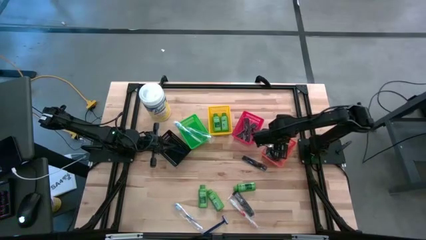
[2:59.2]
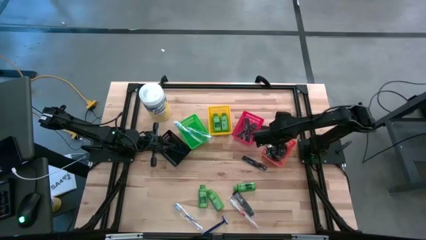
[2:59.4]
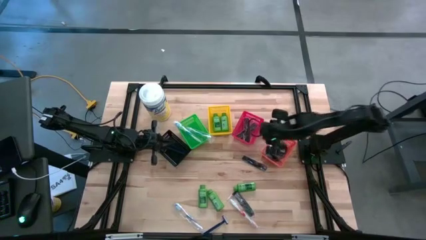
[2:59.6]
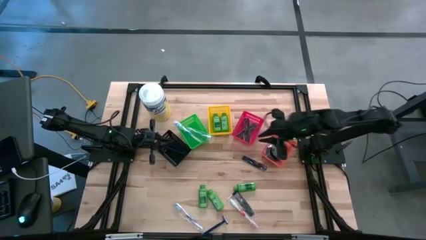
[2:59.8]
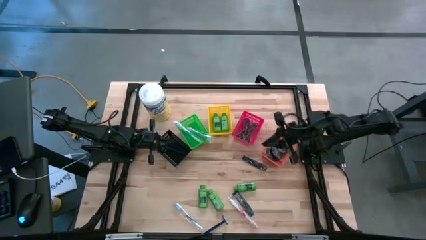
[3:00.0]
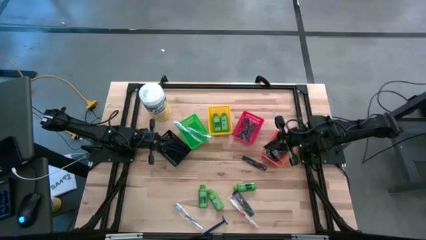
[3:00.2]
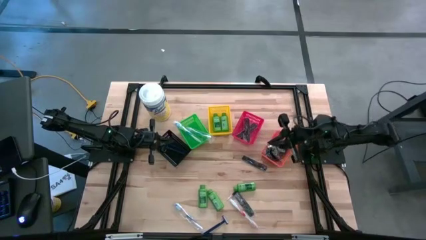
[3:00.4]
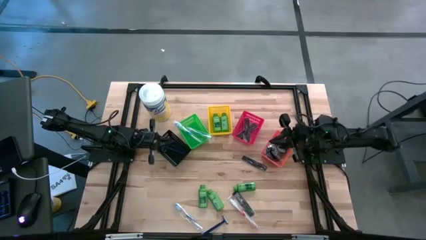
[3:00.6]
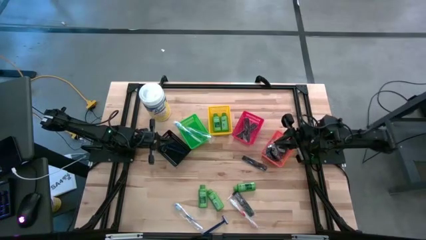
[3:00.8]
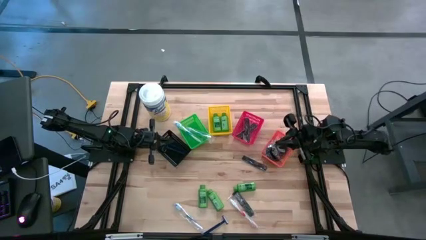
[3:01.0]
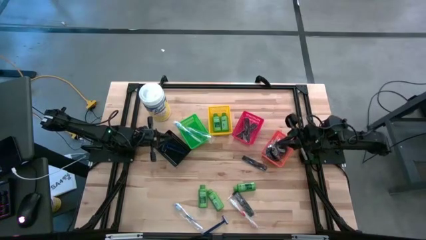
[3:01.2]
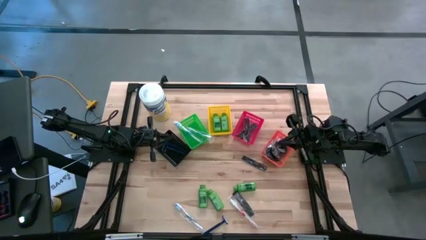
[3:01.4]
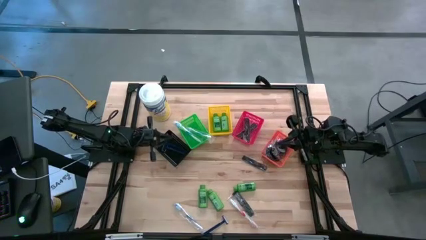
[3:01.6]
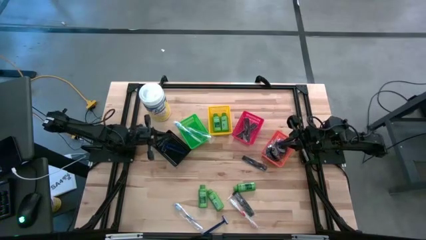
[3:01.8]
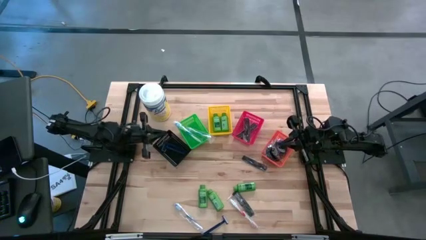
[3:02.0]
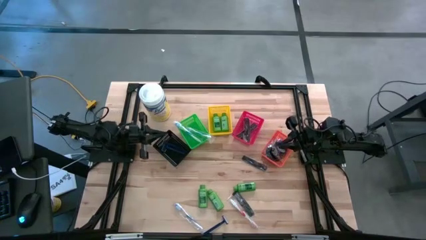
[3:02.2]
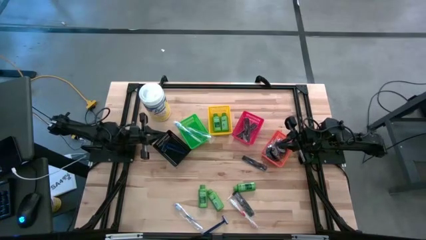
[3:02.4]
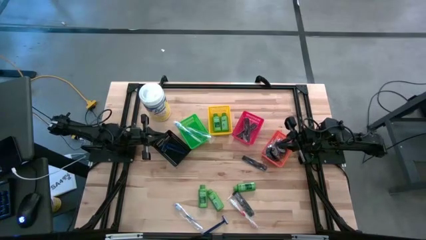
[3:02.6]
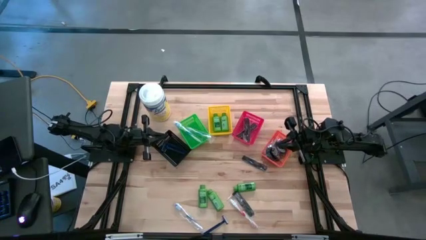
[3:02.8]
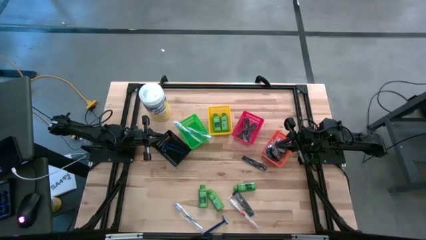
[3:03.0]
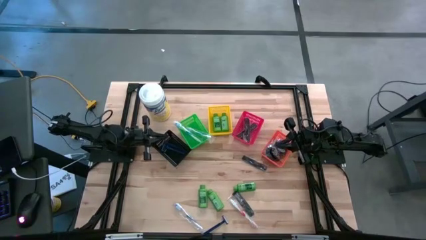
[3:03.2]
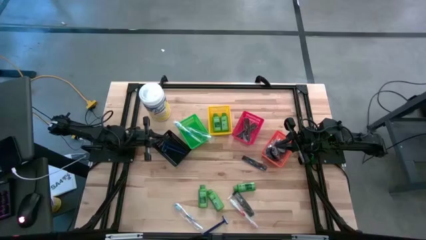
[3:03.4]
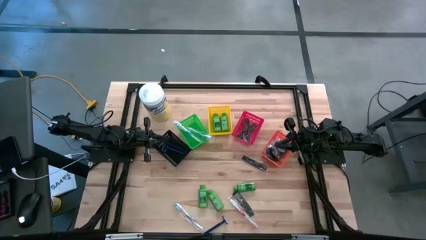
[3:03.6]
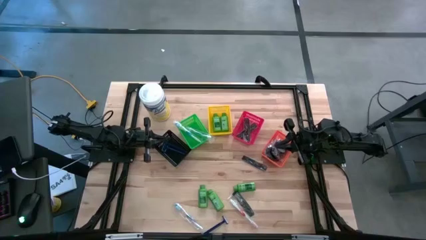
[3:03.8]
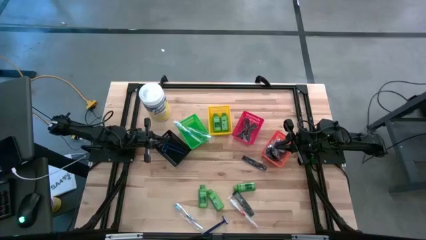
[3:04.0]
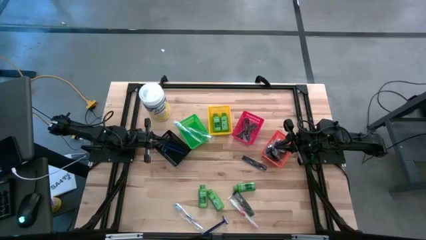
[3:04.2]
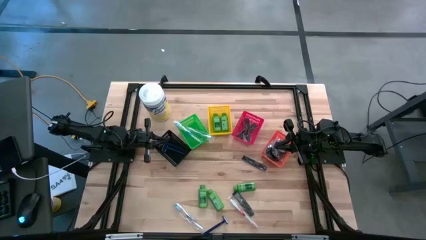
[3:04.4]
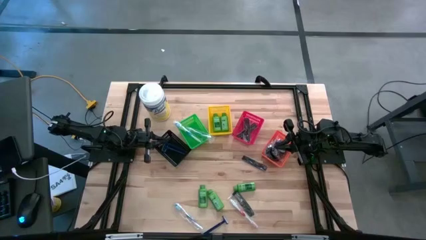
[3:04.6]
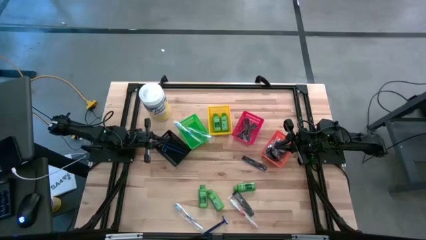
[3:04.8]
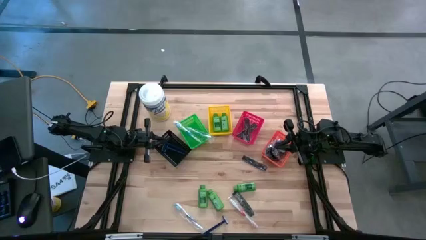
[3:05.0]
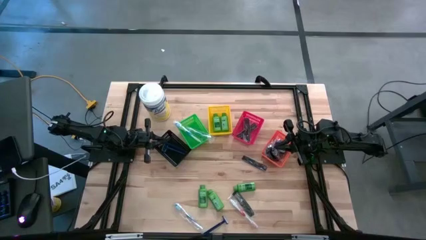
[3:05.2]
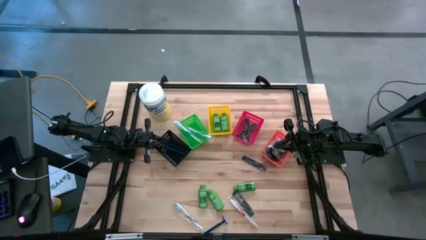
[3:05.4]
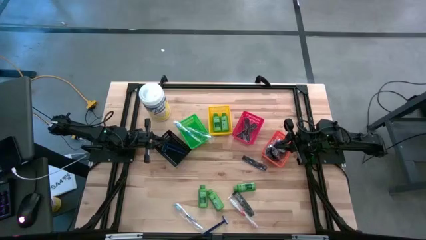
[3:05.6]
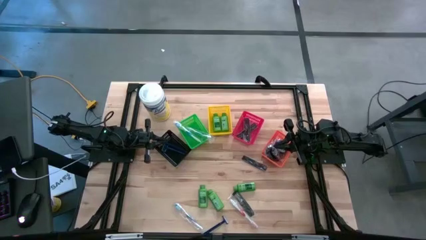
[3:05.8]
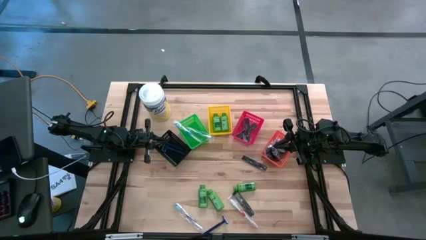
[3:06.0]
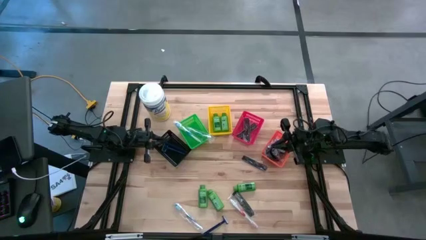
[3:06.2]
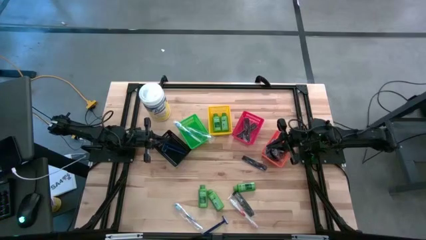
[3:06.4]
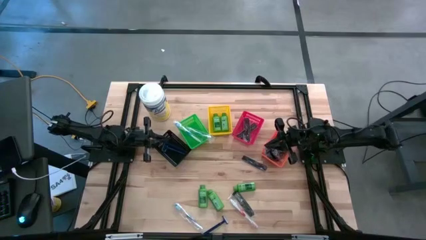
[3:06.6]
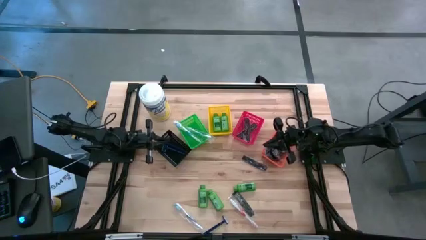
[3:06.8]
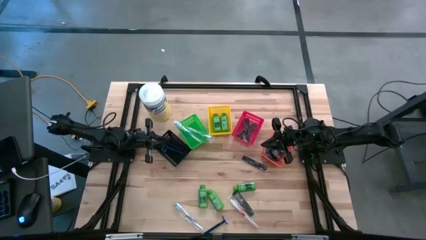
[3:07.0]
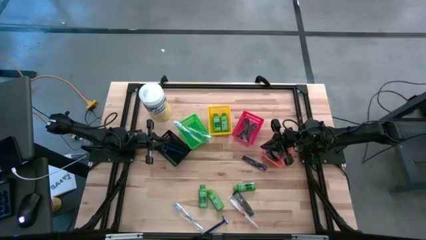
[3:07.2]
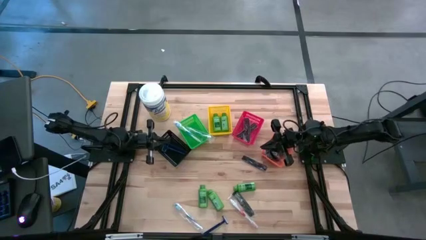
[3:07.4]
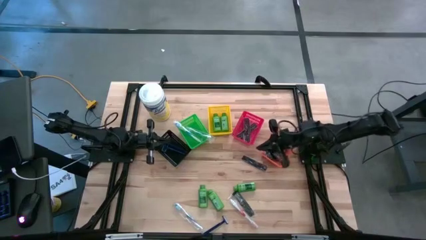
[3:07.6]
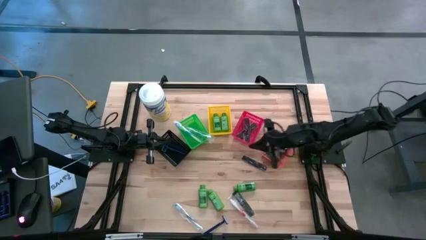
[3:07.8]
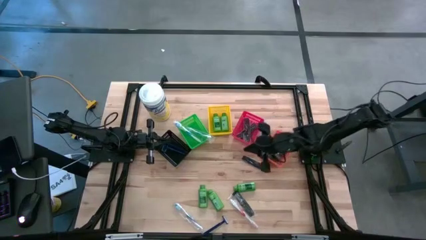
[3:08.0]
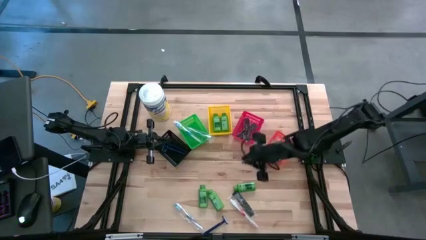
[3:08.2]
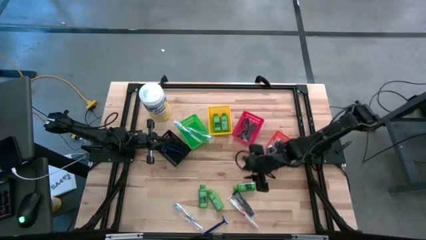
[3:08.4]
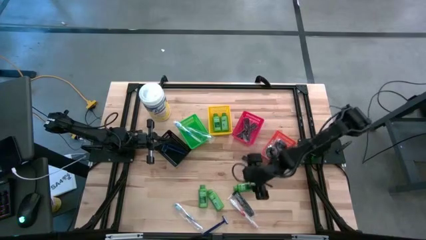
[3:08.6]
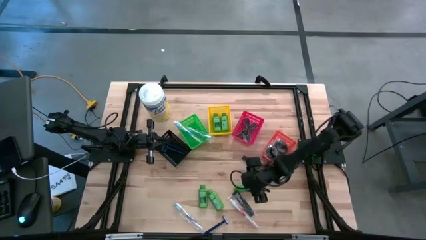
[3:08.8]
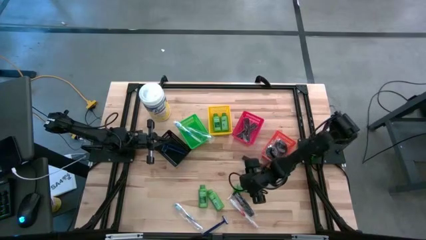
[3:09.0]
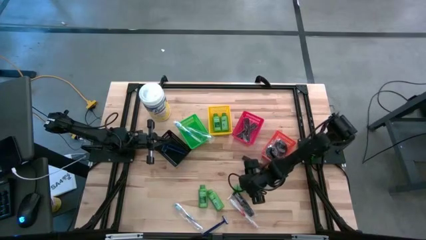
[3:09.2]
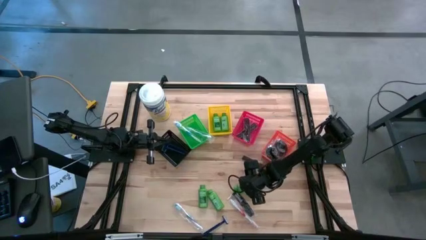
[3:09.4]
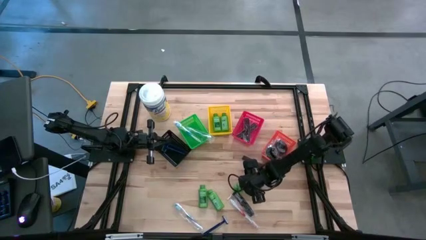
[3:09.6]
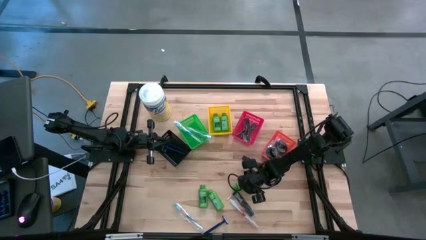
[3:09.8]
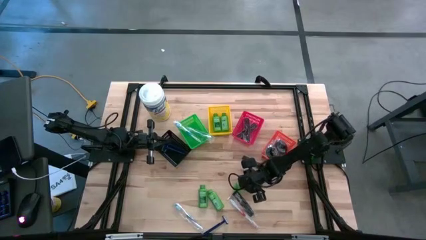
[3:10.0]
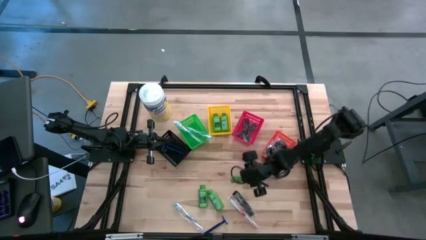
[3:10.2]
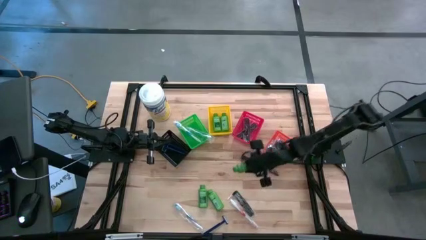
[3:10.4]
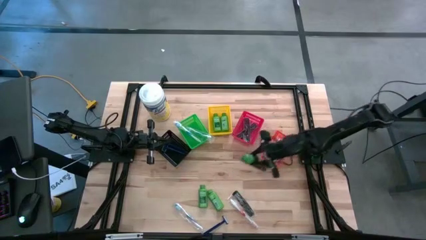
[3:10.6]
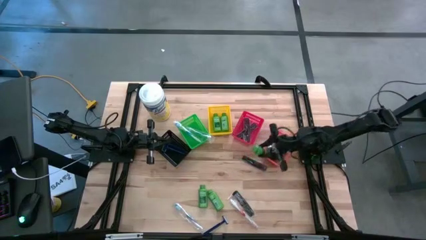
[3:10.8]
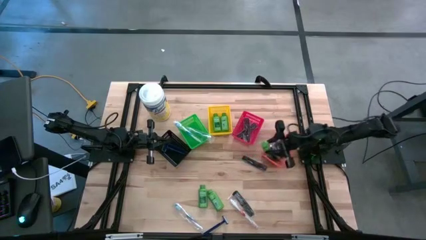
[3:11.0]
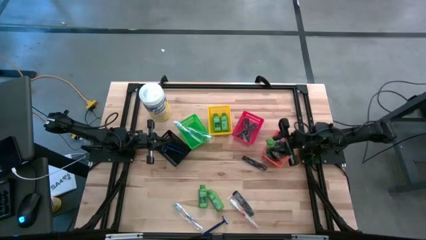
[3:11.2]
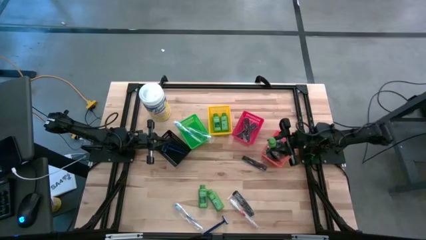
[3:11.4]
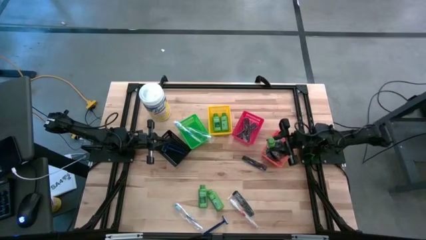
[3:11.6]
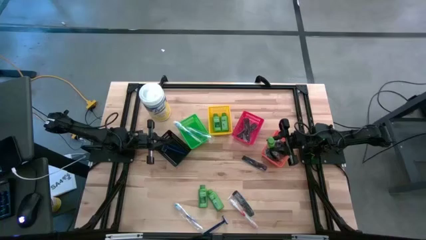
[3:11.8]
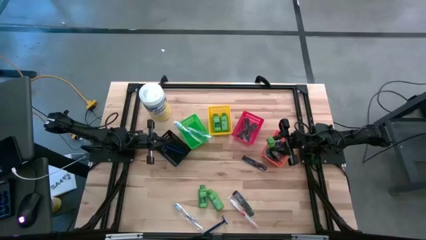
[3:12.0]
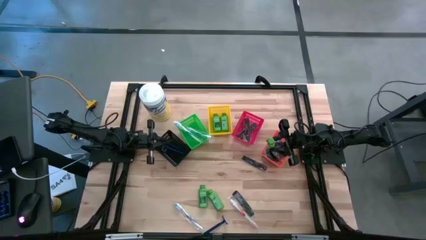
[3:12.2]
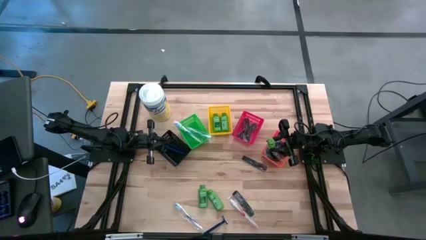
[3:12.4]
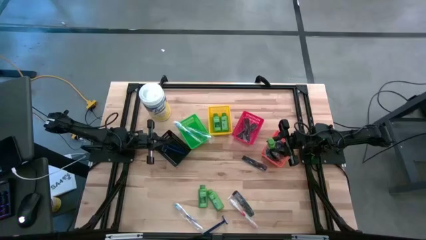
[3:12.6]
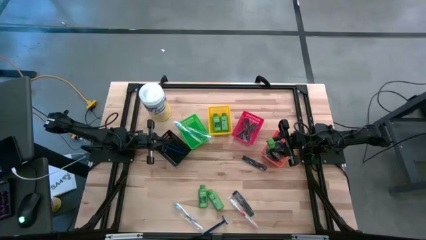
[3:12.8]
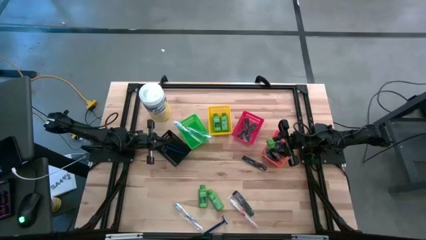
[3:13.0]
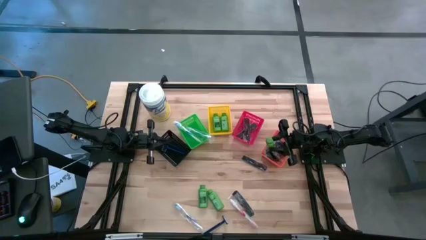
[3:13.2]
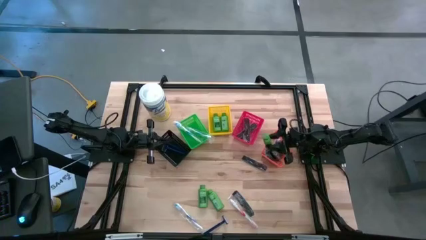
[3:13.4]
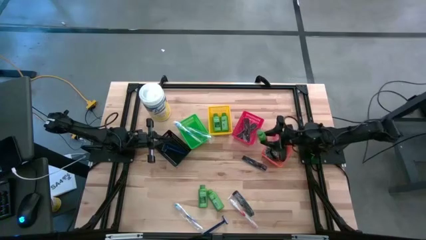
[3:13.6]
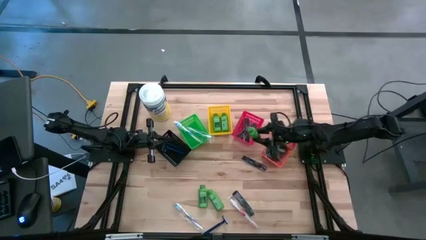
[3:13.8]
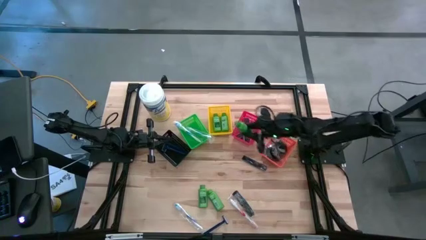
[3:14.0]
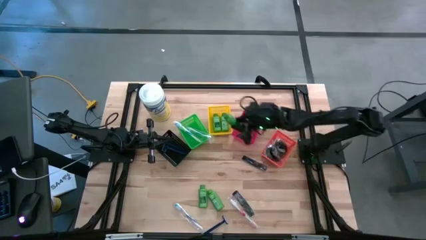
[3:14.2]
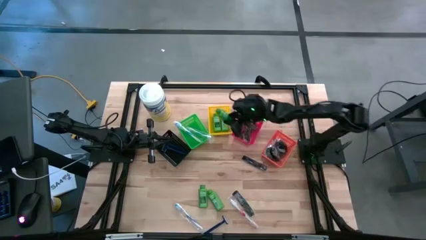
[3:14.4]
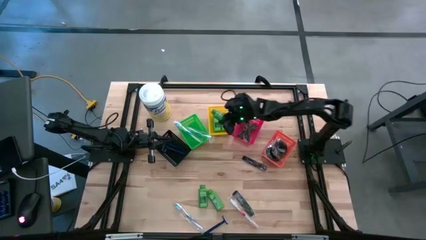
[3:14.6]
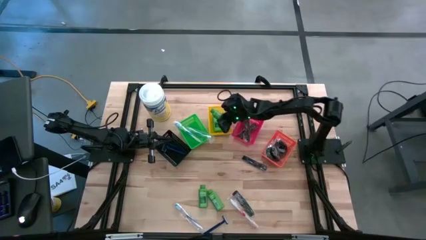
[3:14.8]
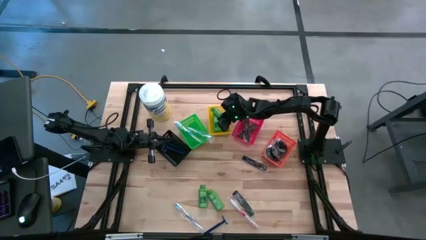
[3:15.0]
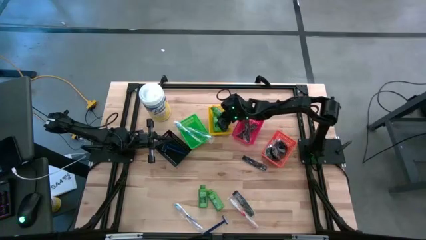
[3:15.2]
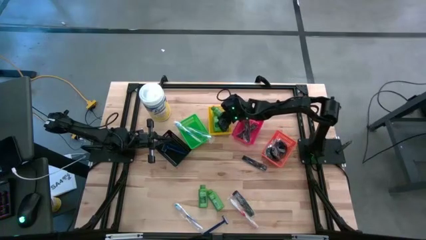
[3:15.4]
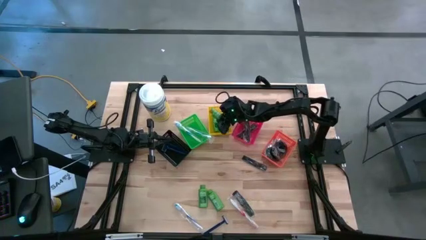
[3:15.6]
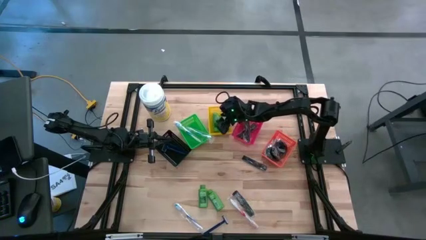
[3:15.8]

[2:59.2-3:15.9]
Task: Pick & Place Travel size toiletries
Put the green shampoo bottle into the yellow bin
